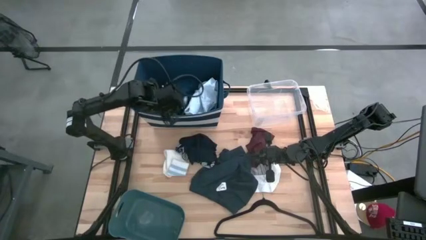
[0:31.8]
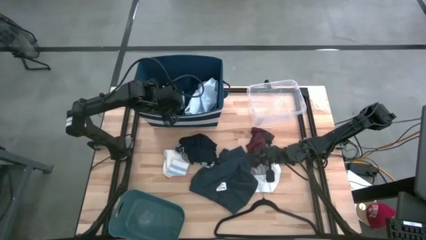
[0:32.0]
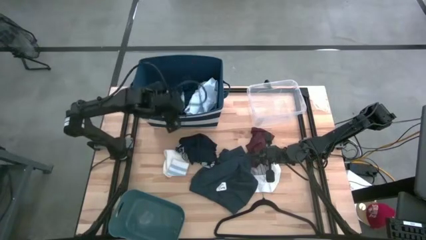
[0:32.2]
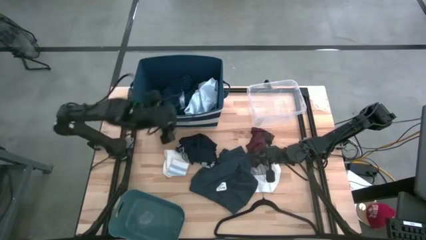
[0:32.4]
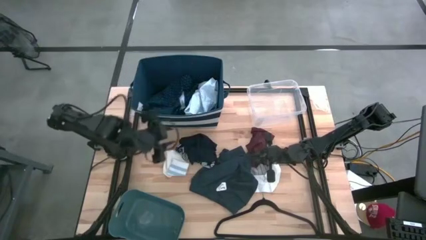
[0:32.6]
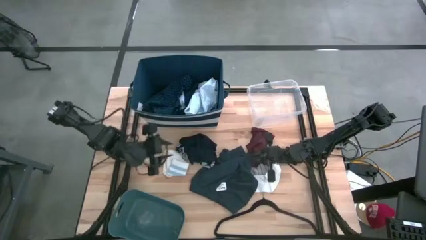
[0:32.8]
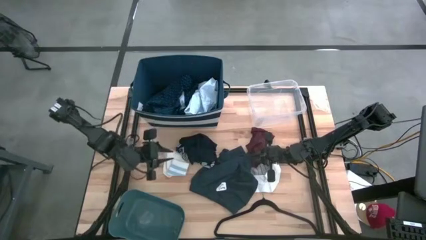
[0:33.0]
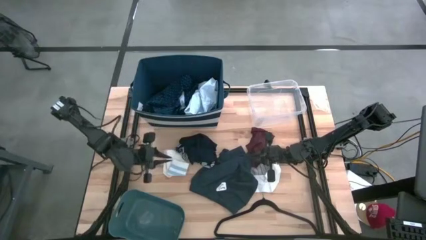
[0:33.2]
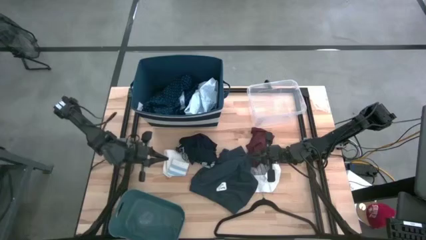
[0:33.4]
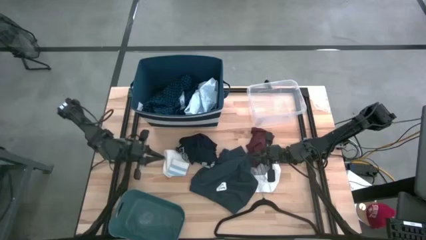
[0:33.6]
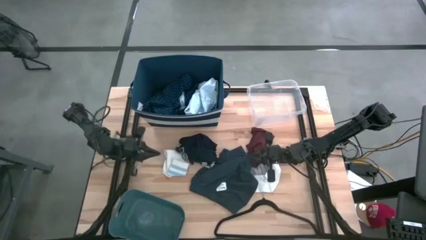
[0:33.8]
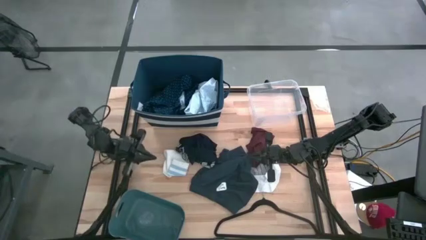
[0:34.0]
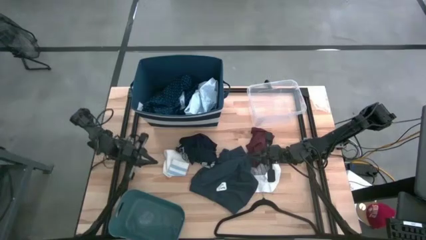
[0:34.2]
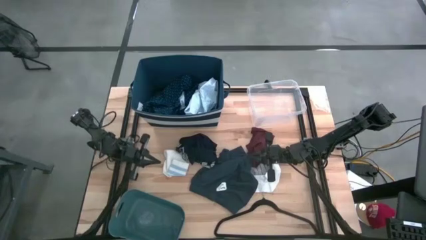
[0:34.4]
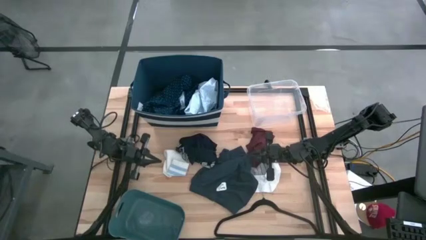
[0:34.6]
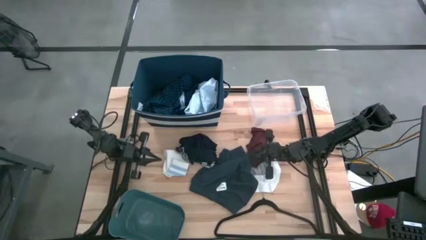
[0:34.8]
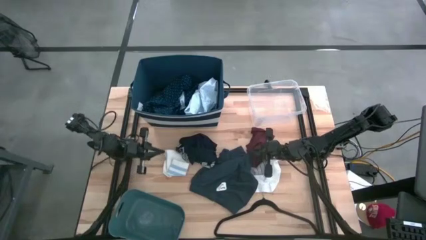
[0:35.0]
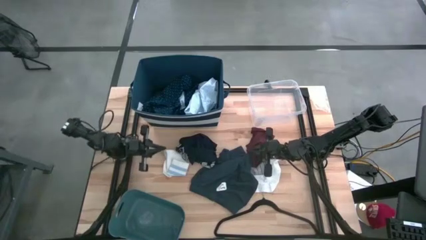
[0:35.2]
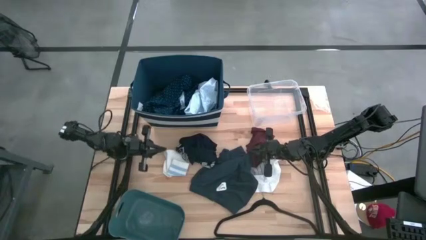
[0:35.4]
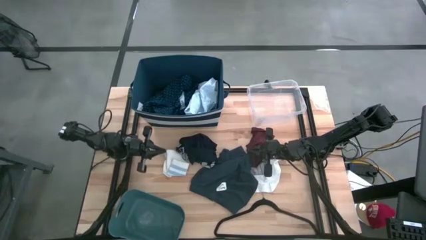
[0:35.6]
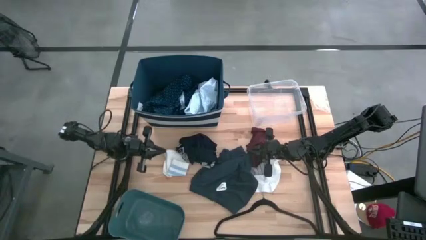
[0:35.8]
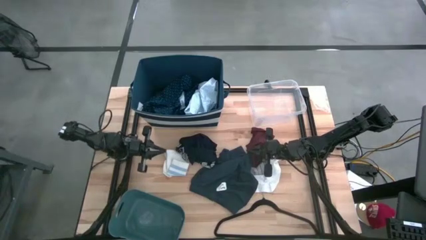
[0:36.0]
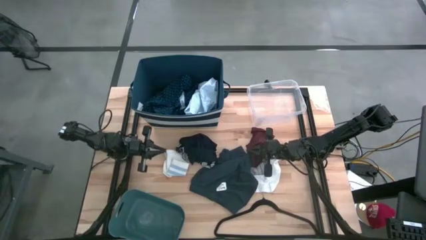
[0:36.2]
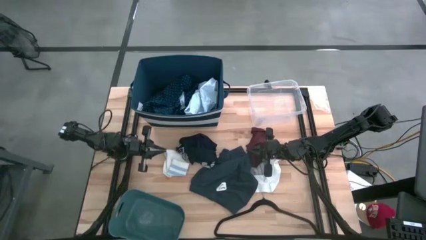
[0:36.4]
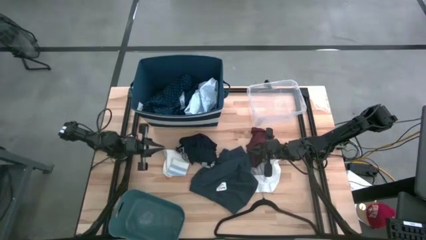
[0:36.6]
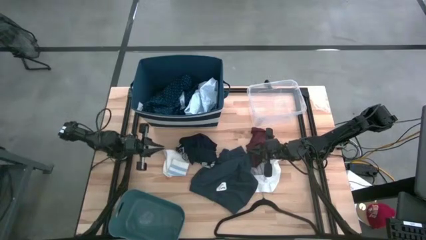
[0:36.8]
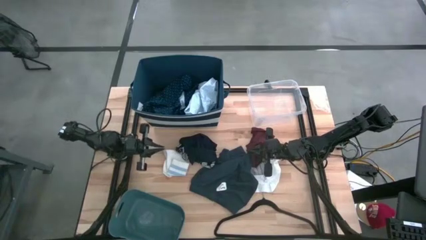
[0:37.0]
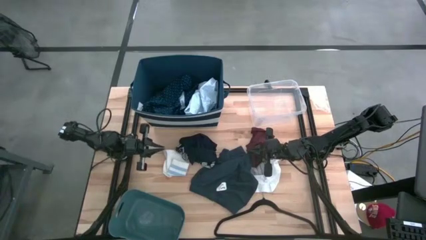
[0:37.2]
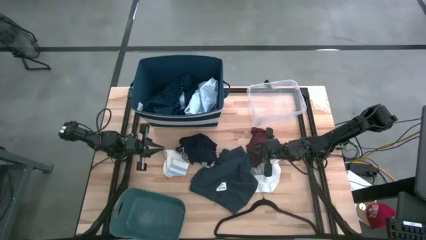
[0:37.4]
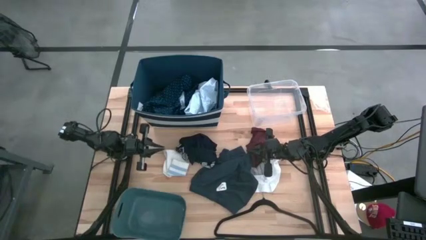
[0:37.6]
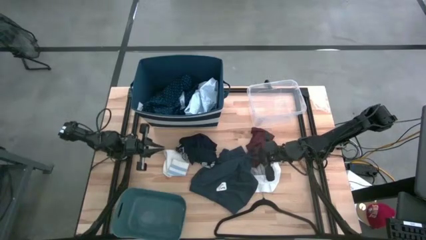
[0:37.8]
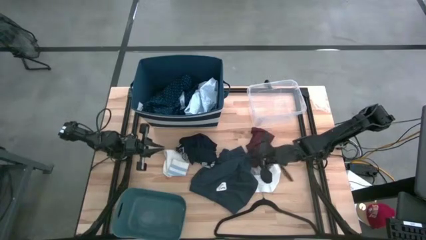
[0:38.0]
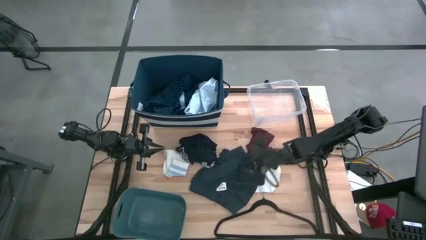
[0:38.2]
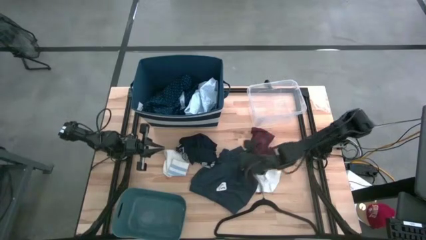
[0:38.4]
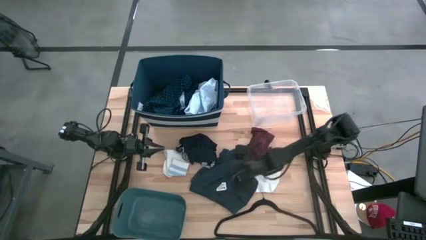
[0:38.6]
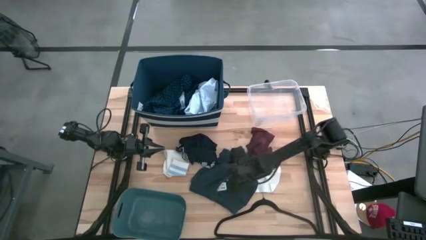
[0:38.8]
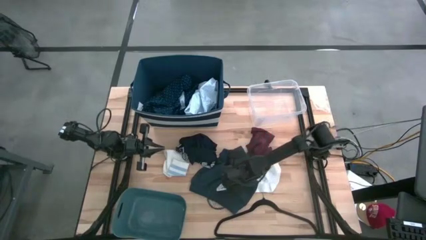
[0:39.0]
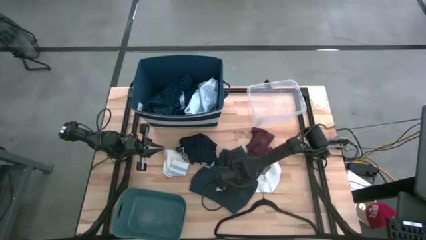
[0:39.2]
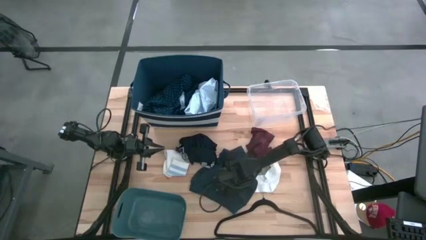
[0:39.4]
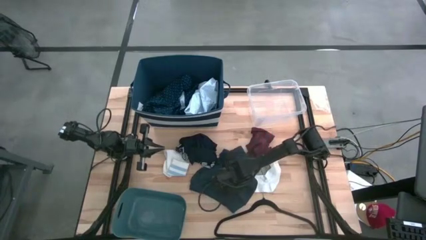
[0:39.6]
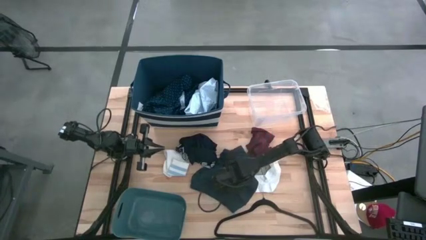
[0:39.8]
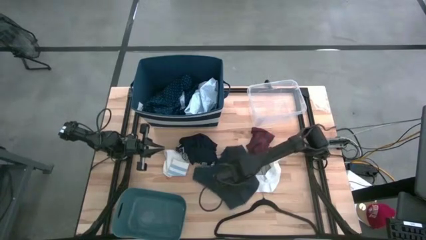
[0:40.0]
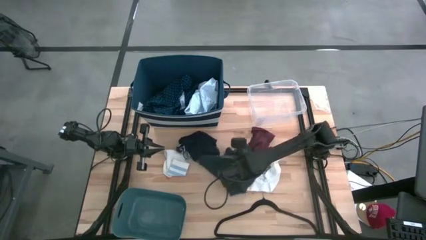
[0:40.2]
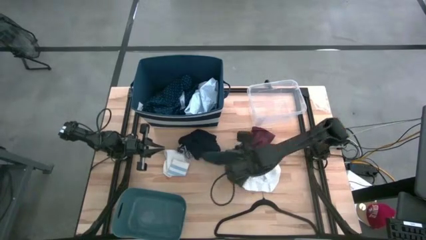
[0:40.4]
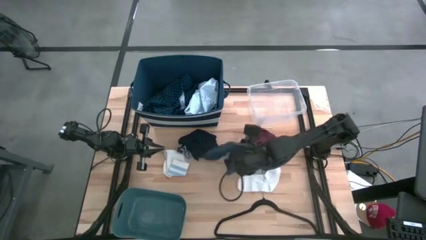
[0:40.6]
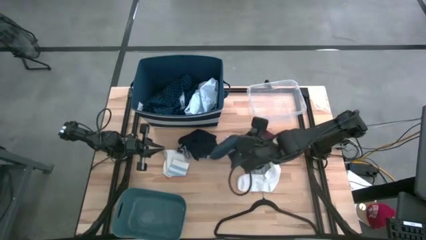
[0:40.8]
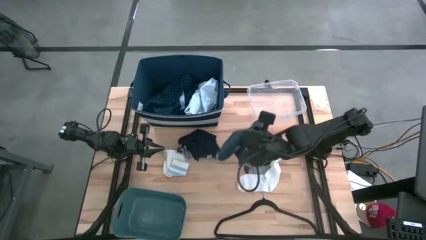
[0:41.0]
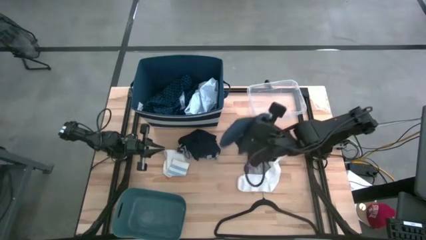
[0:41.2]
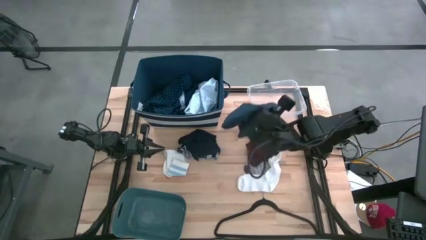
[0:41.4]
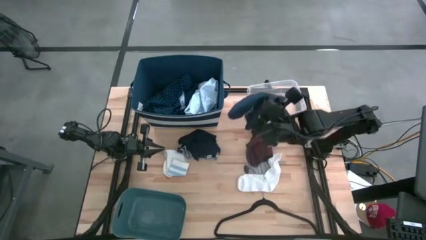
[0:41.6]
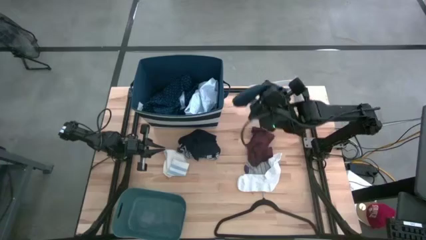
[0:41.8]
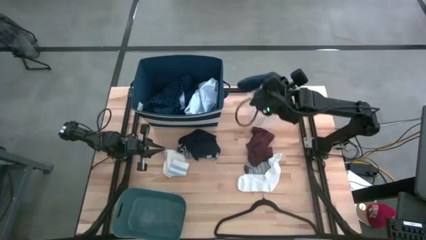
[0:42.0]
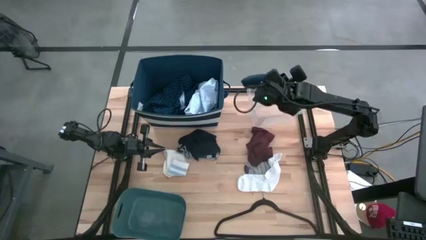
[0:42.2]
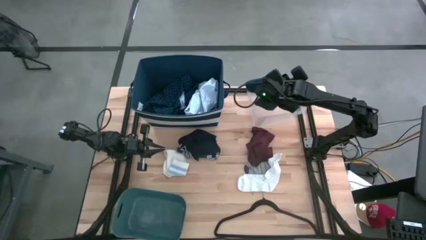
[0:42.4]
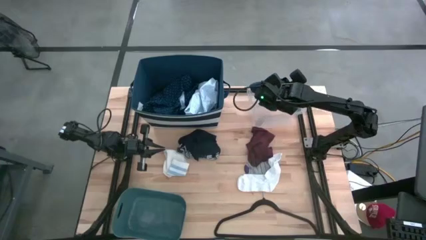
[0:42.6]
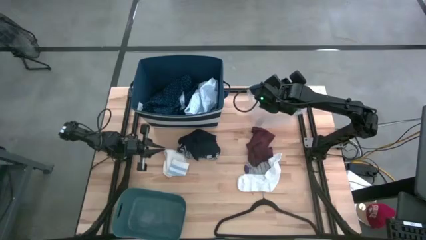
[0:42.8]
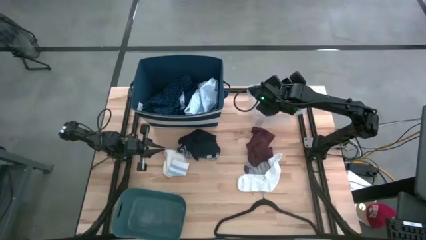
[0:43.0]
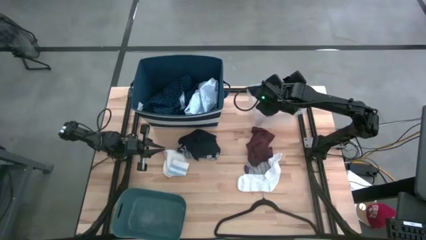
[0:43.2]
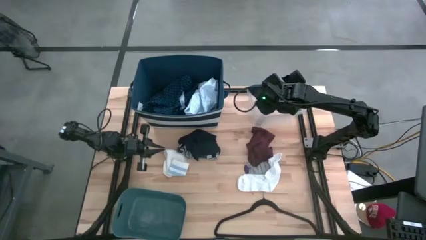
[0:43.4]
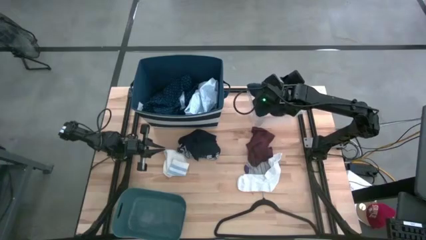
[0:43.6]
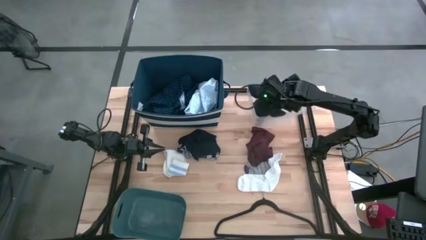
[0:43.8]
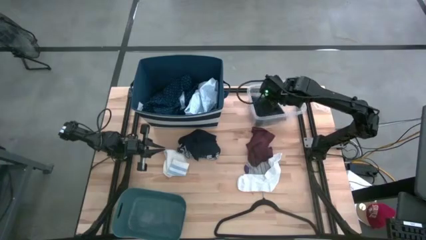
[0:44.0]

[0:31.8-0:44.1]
Task: Pick & Place Cloths
Put the gray shorts into the transparent bin

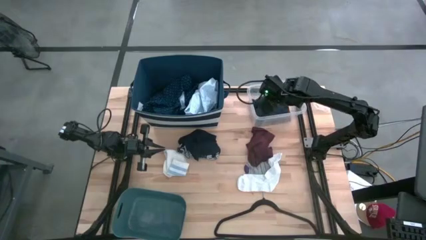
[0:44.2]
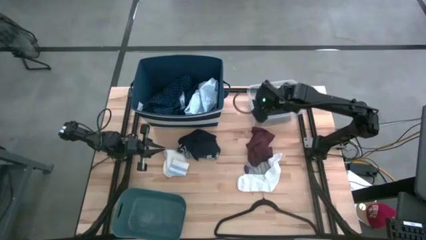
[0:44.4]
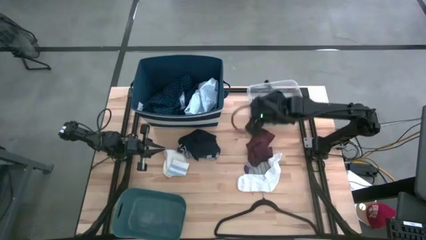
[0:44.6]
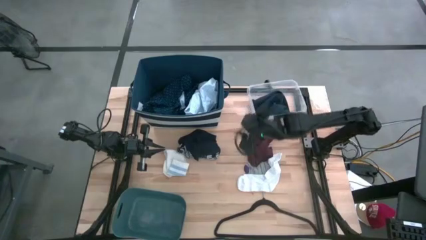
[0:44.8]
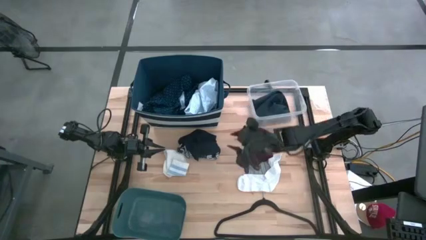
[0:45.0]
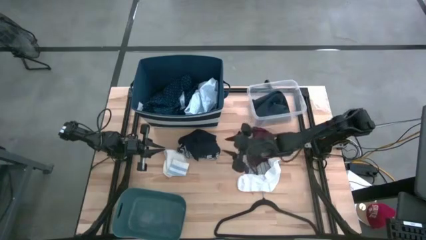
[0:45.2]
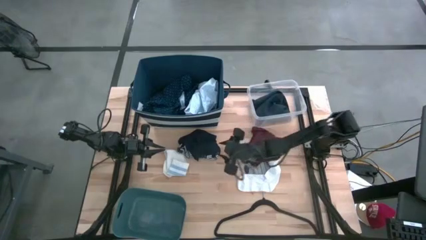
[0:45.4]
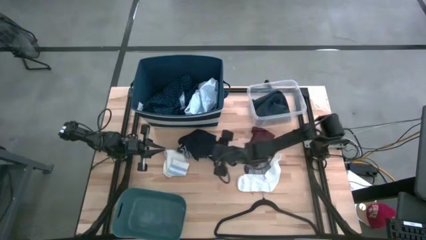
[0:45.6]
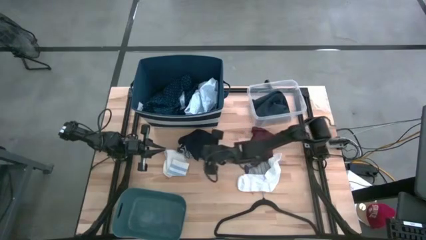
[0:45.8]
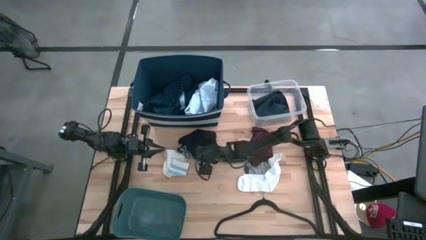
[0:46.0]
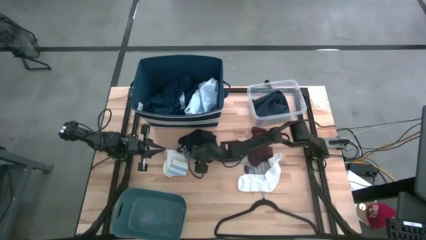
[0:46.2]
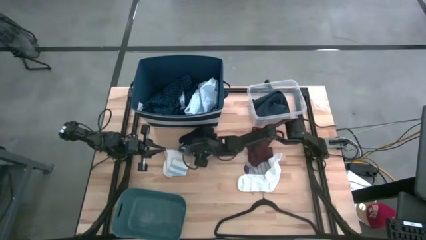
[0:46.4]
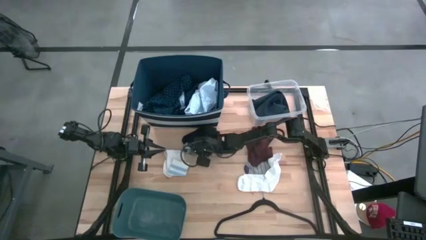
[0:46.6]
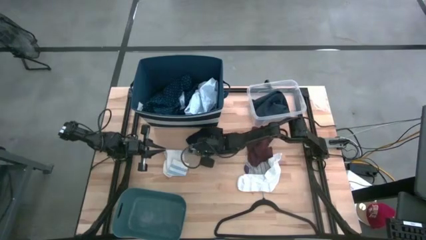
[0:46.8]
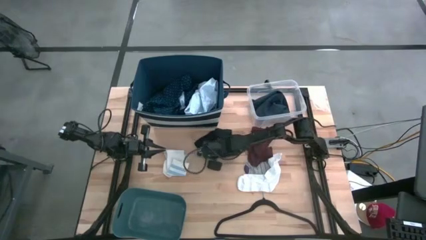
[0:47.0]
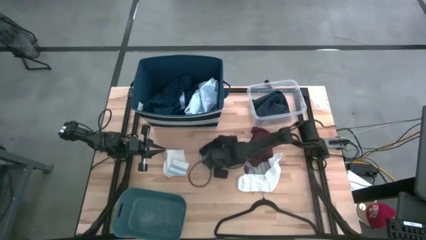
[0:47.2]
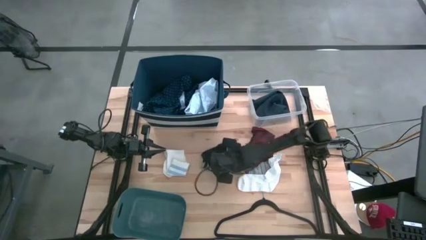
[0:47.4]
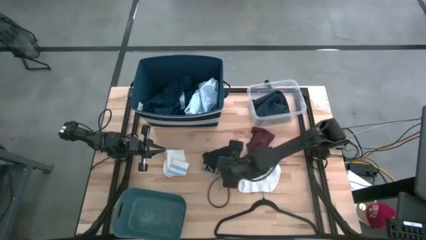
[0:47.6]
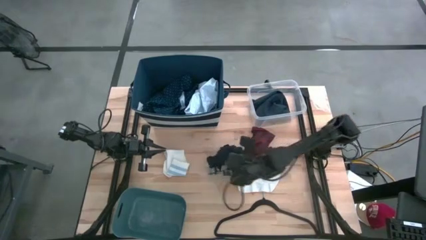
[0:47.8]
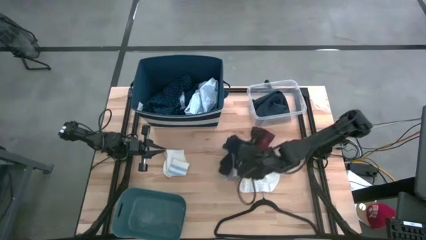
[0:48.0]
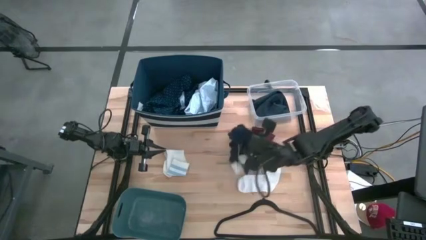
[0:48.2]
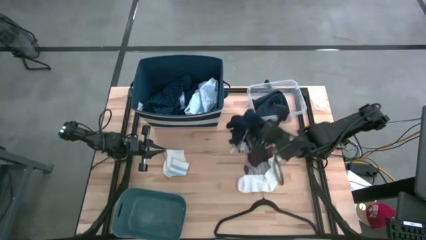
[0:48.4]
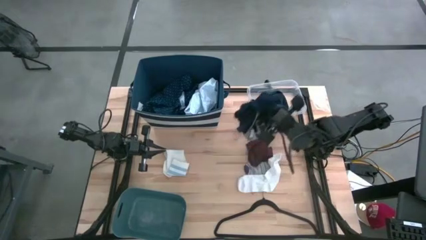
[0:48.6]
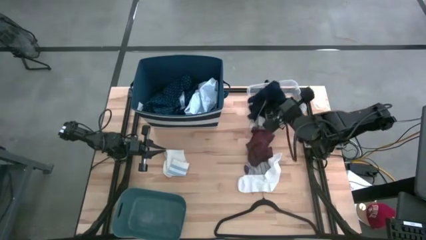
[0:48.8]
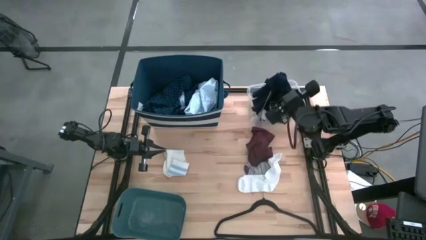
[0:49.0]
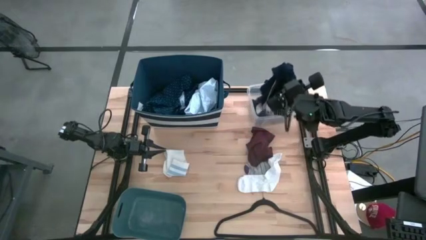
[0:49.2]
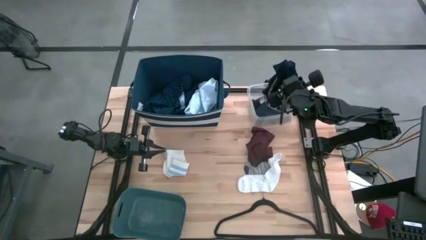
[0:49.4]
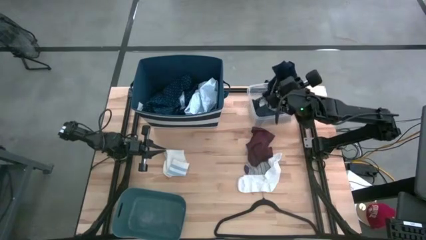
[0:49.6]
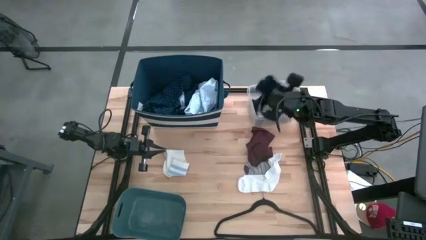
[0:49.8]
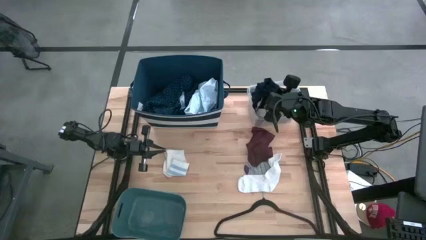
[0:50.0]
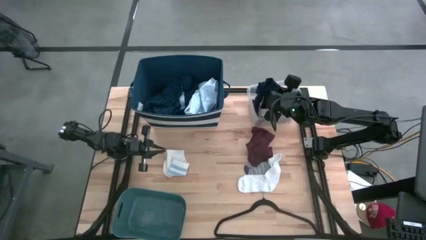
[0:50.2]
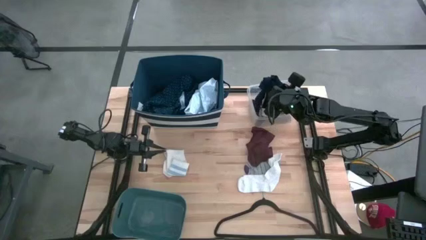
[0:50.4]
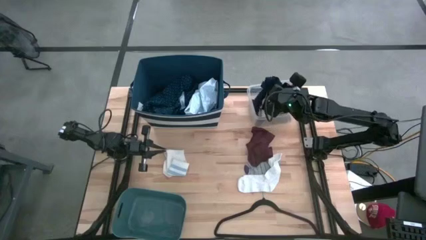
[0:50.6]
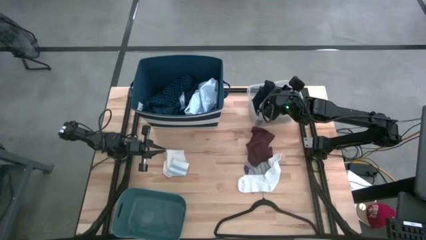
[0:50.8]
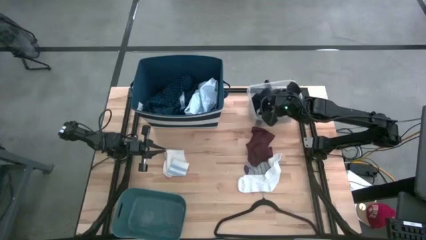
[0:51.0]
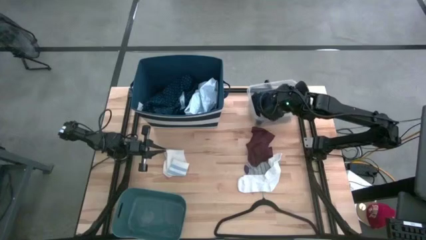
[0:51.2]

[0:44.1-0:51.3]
Put the blue boxer into the transparent bin
